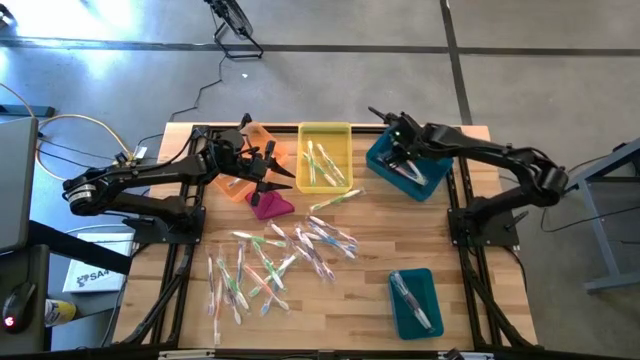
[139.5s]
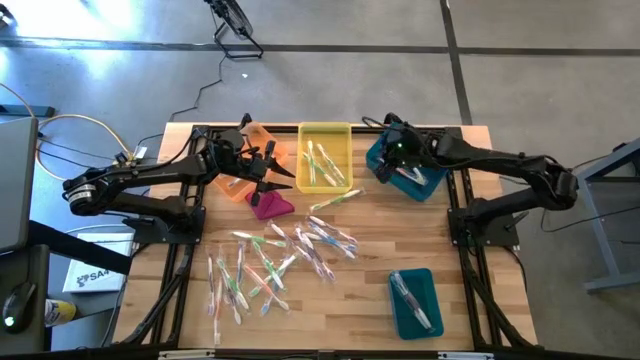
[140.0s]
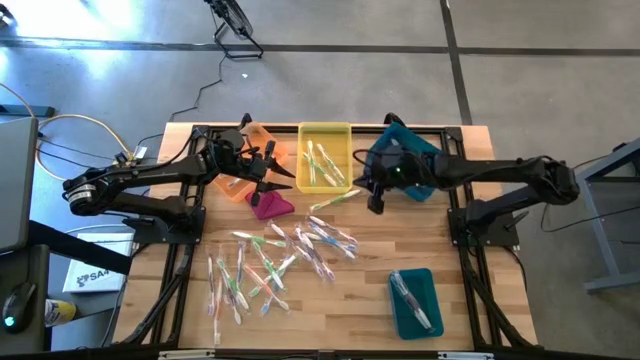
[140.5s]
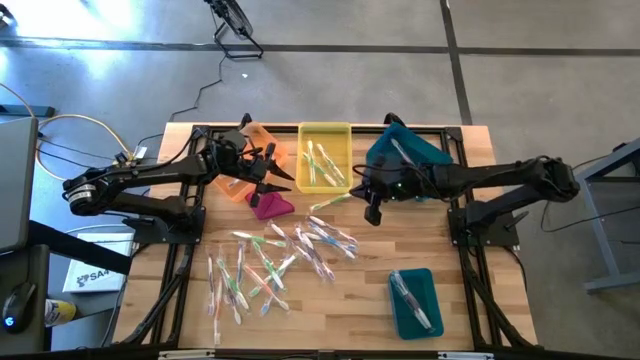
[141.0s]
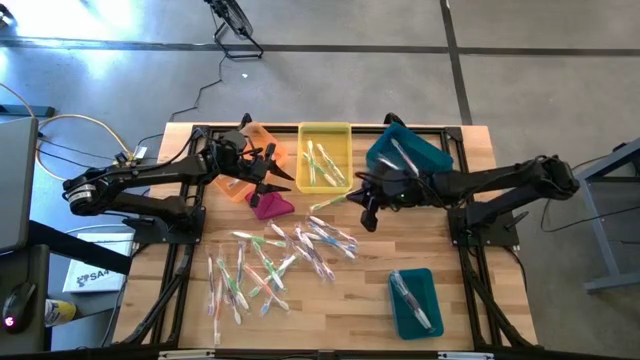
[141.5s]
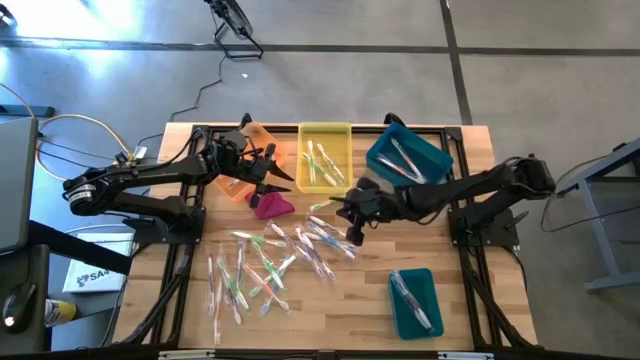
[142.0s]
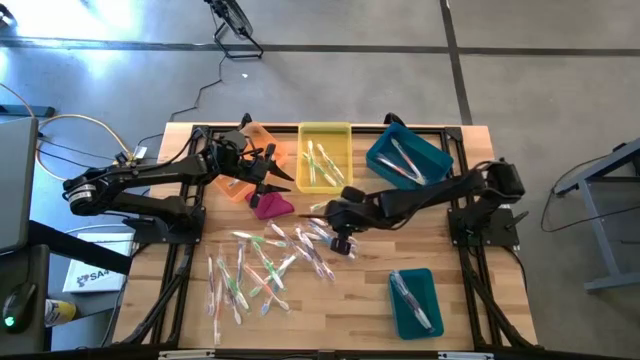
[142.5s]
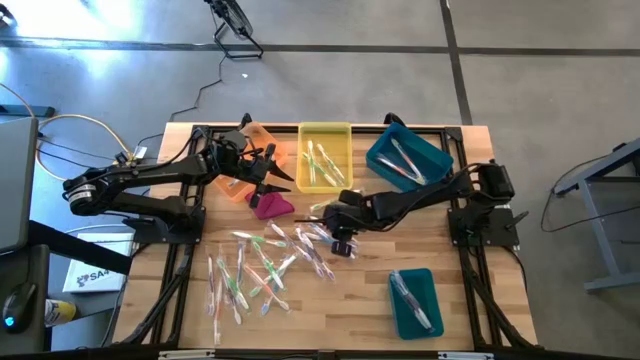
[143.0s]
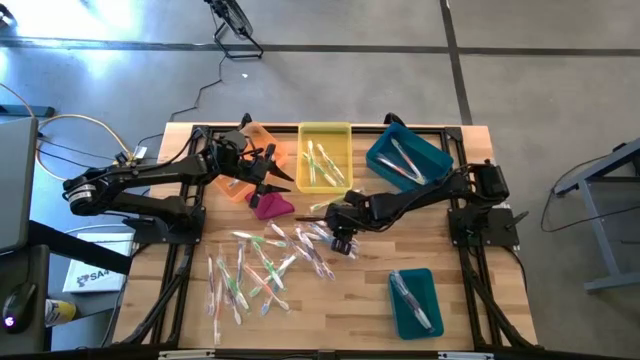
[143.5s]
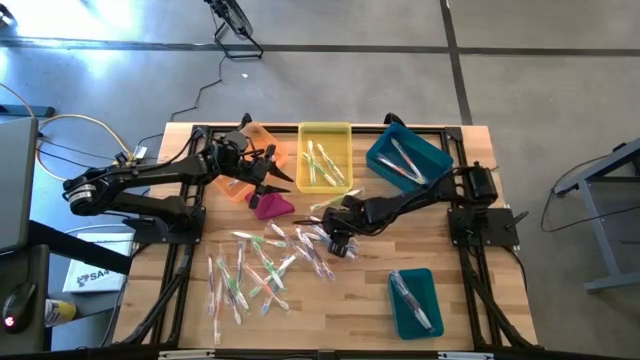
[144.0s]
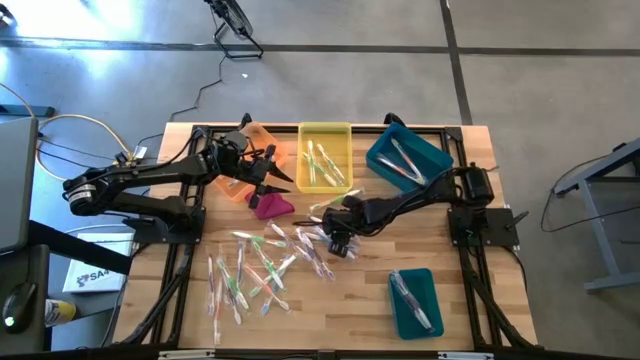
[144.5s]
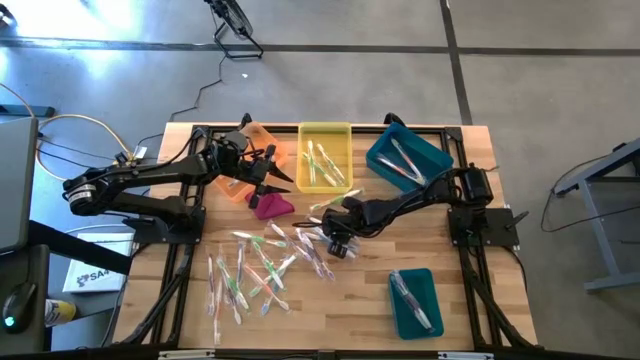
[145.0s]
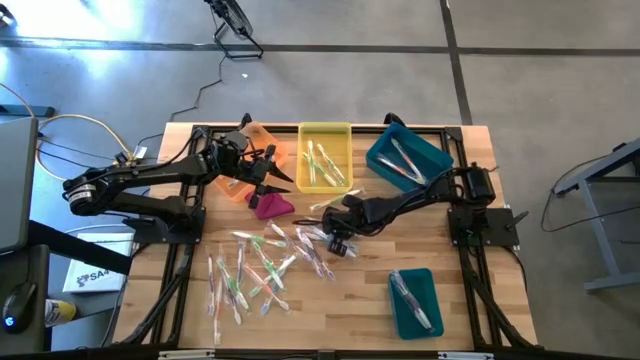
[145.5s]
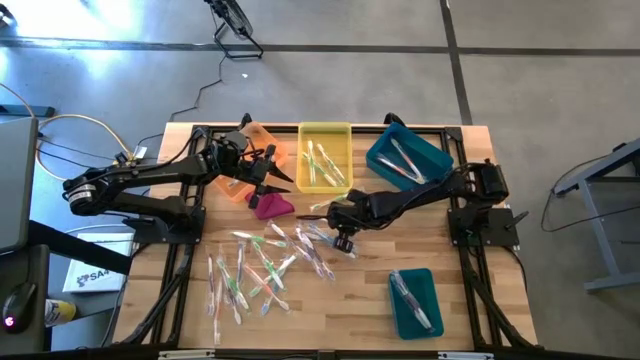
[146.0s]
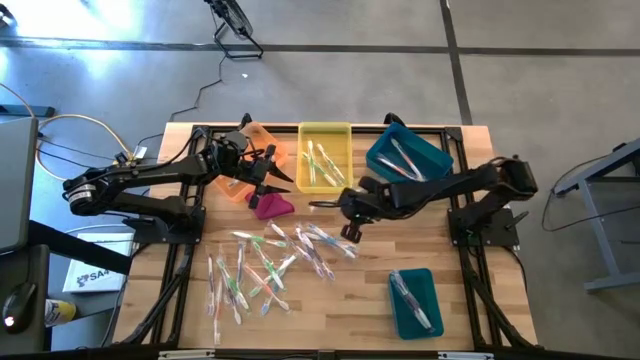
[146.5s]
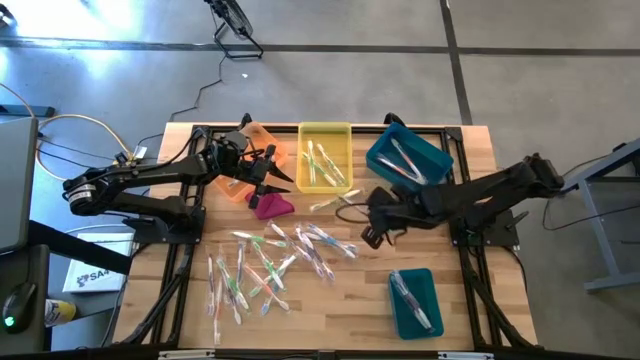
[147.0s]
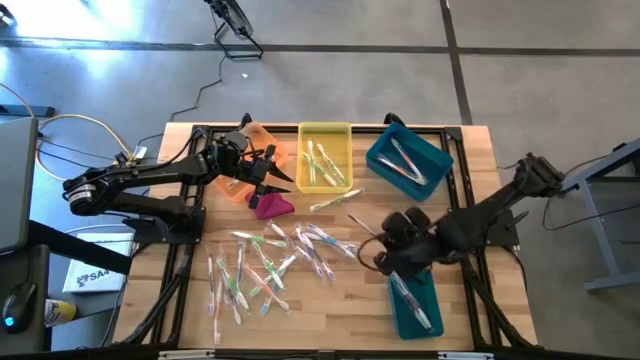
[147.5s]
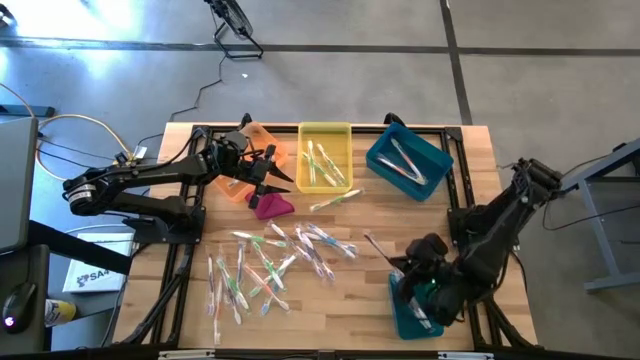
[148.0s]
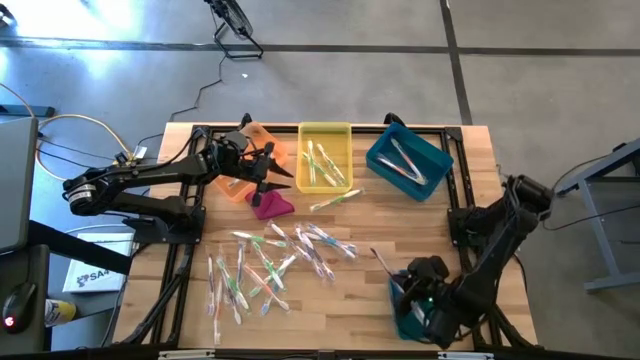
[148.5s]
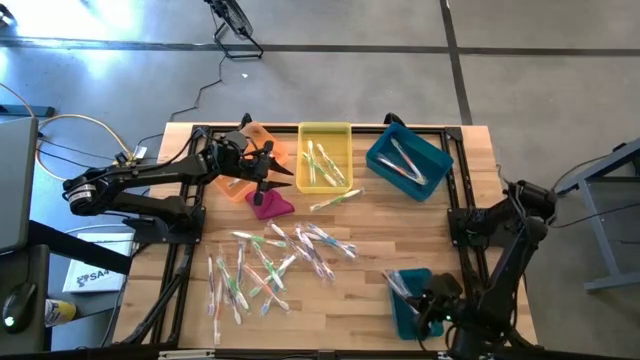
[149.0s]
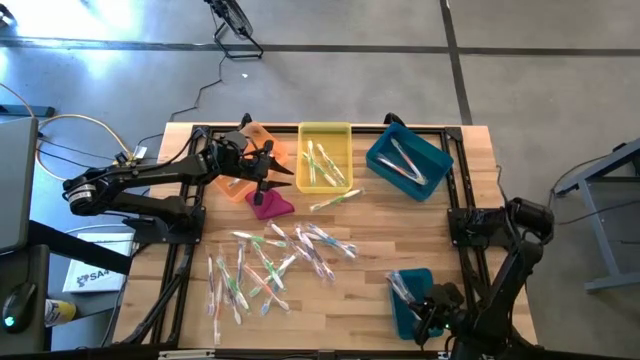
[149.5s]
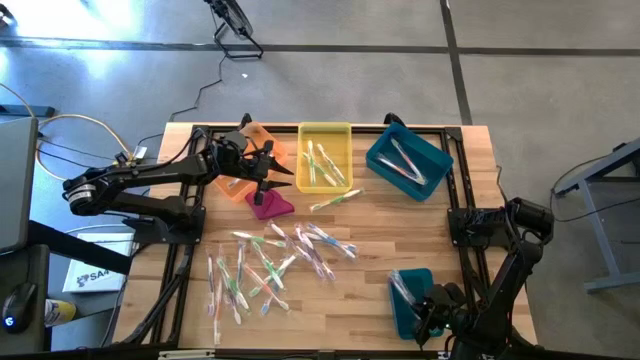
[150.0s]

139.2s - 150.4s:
Task: Pick & Place Toothbrushes
Put the purple toothbrush into the bottom blue bin

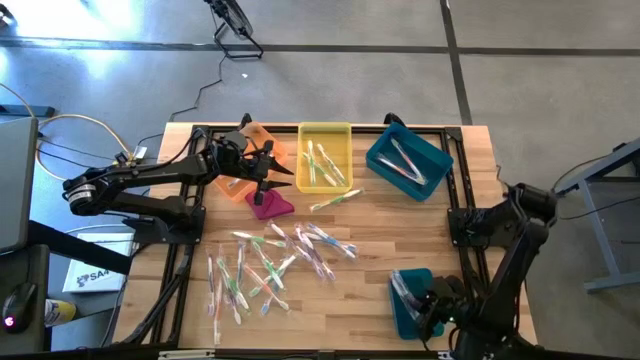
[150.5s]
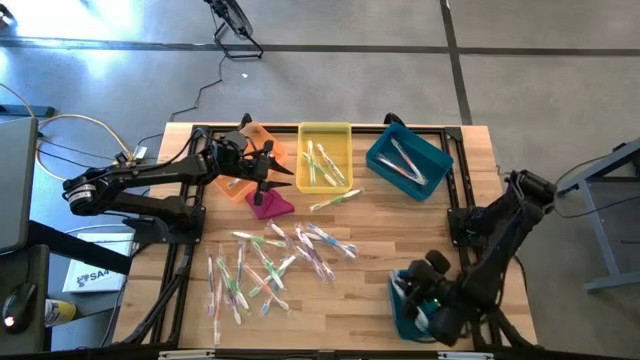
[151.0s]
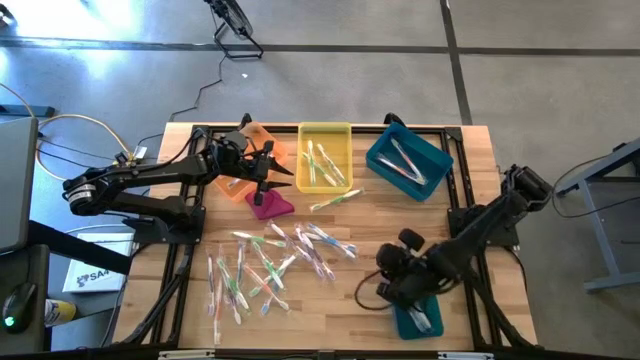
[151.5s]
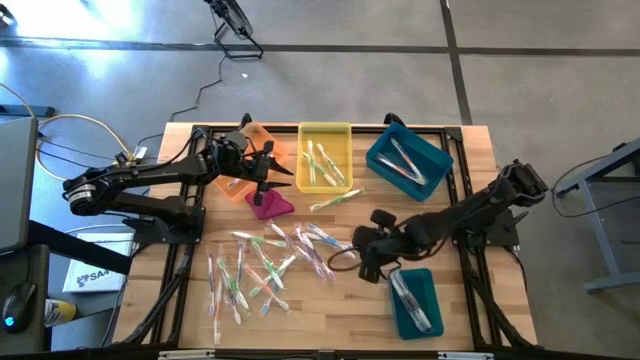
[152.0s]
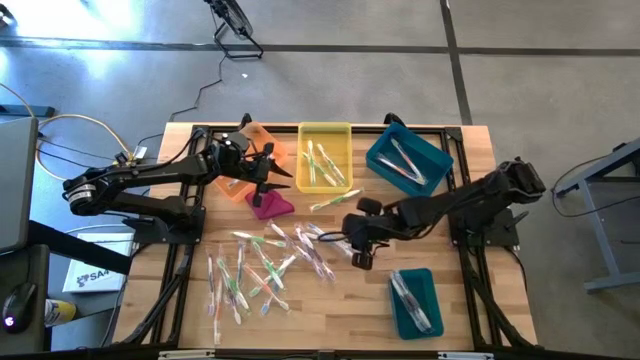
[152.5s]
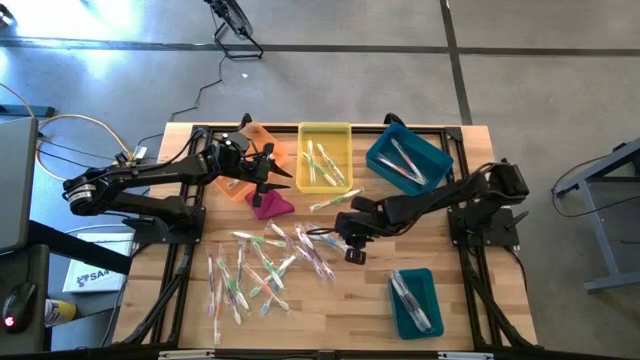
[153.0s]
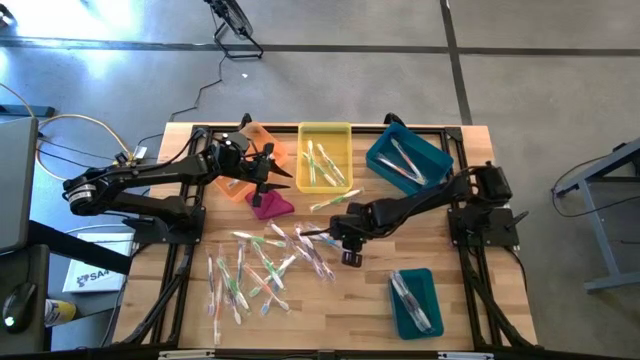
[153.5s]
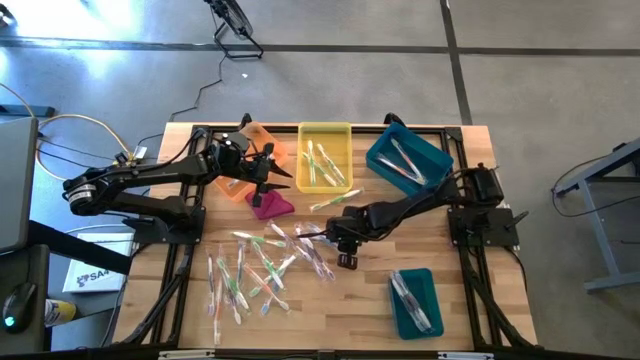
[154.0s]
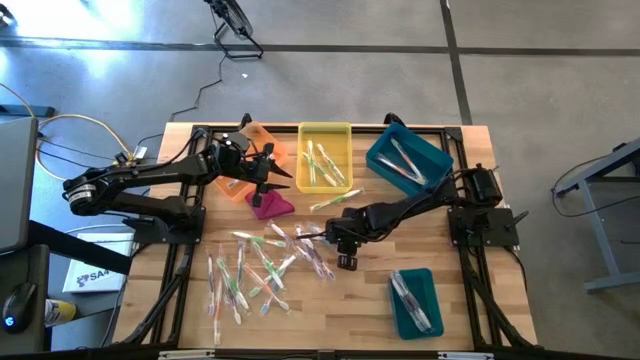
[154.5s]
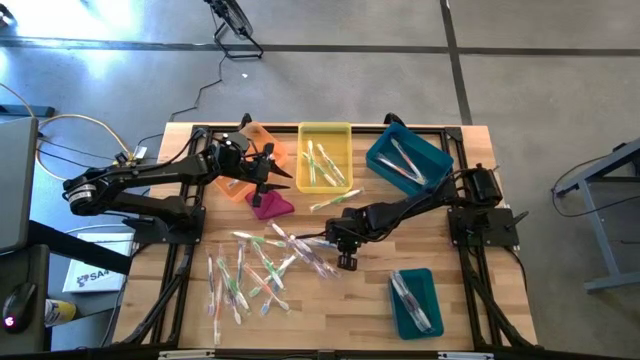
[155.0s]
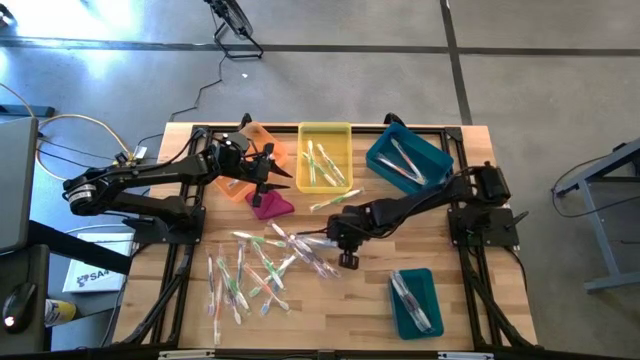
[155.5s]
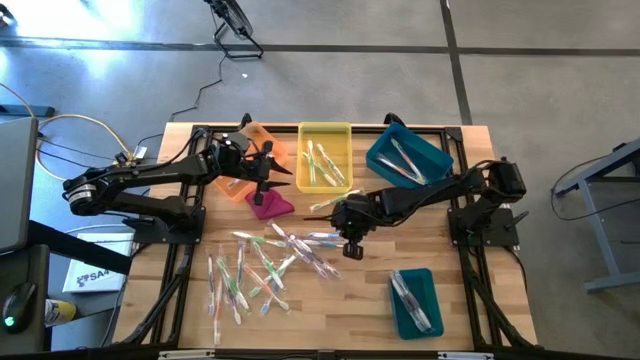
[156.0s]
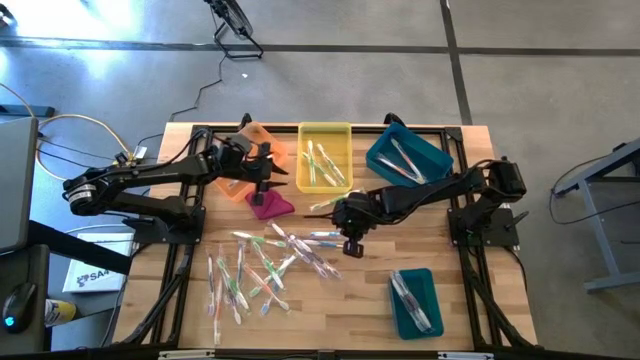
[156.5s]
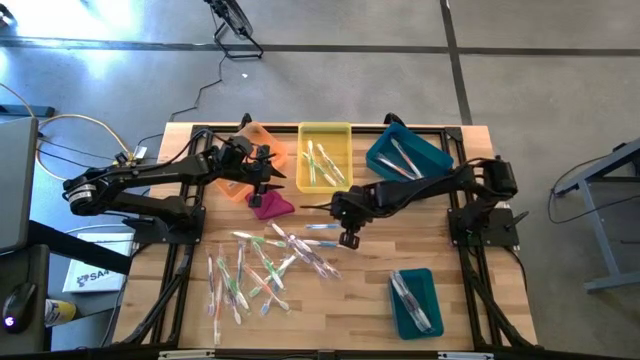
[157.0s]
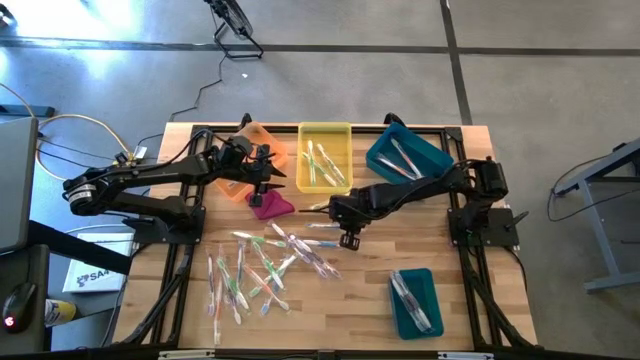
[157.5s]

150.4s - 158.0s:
Put the blue toothbrush into the orange bin

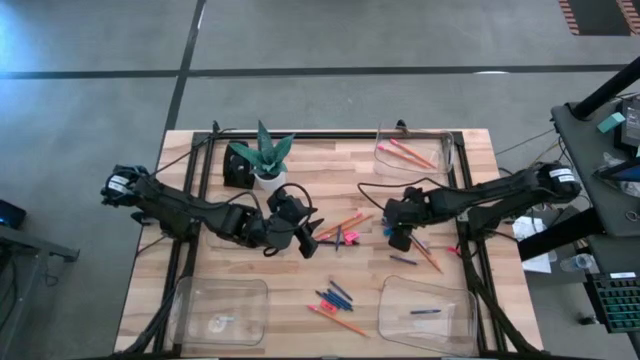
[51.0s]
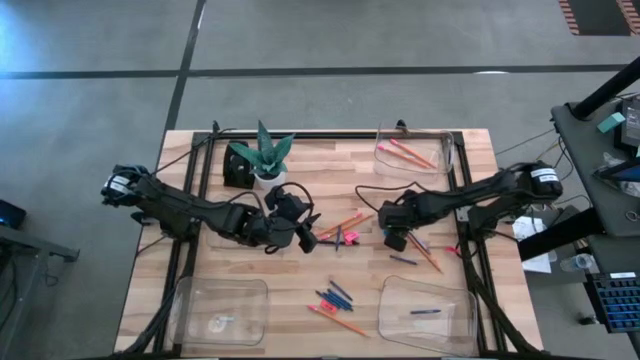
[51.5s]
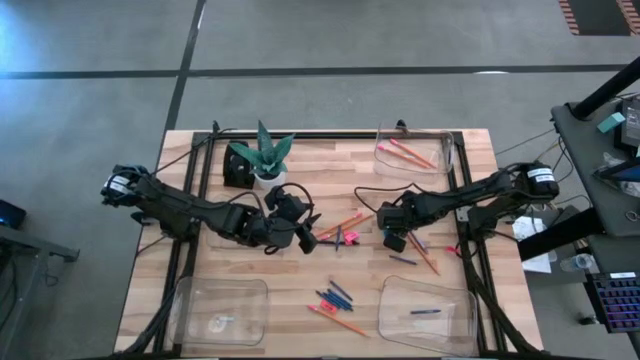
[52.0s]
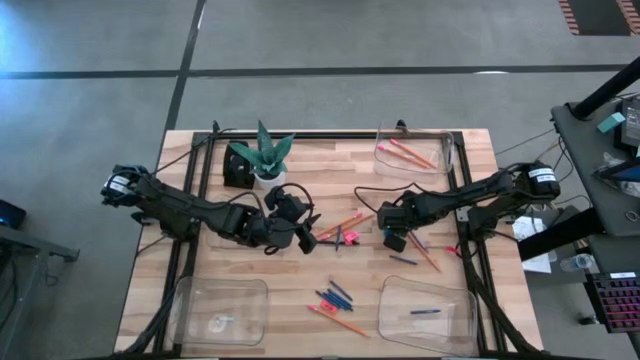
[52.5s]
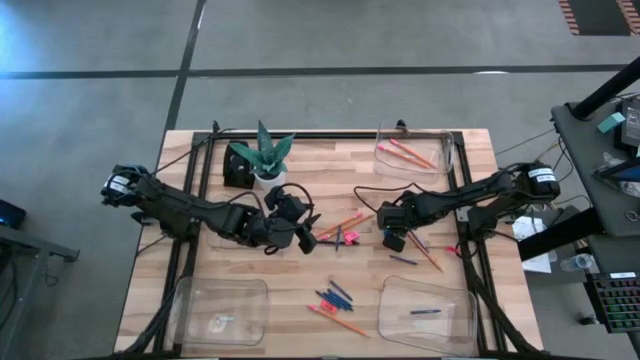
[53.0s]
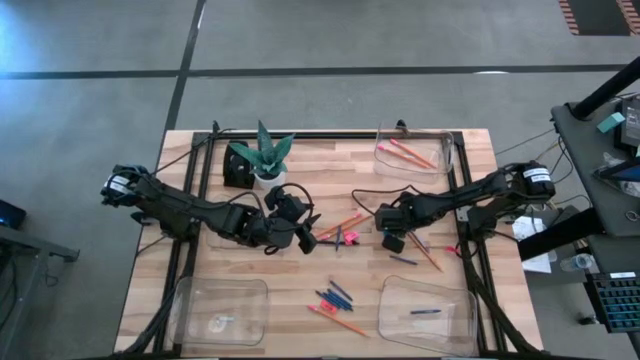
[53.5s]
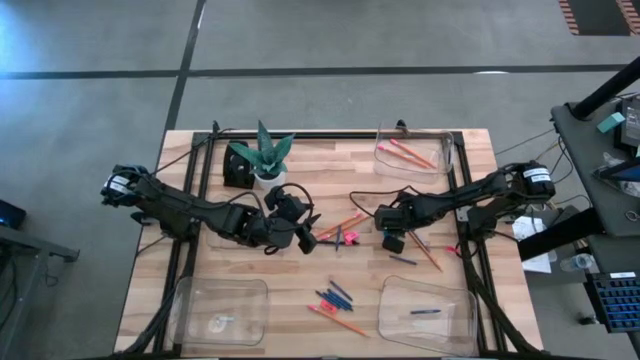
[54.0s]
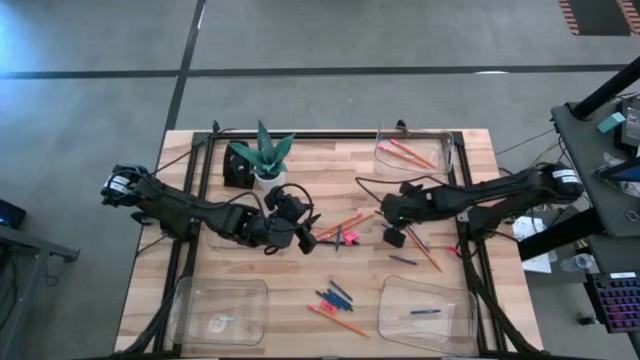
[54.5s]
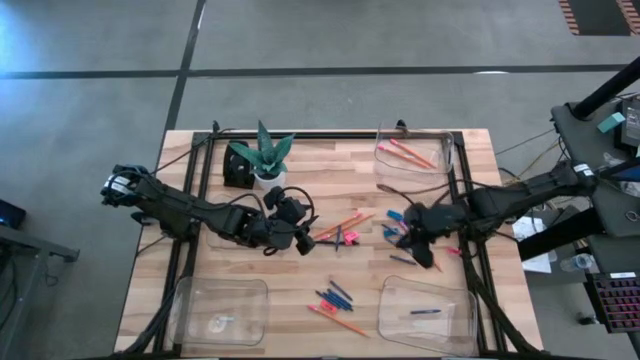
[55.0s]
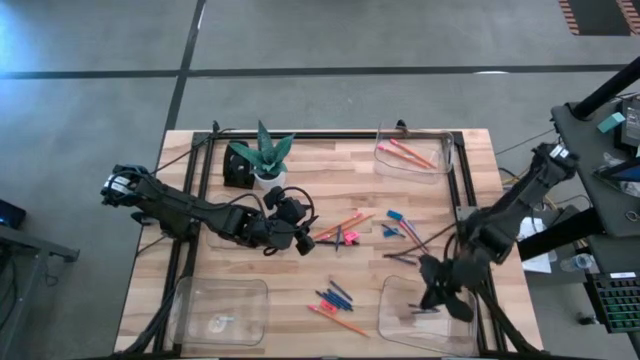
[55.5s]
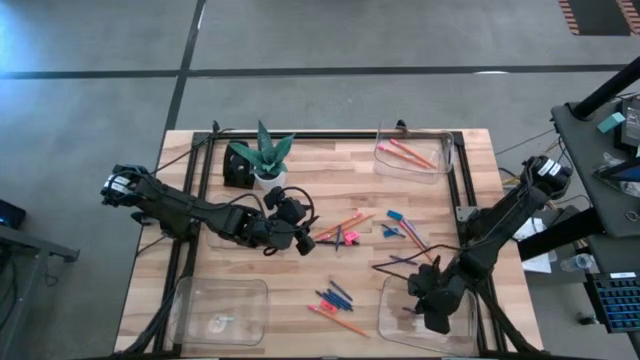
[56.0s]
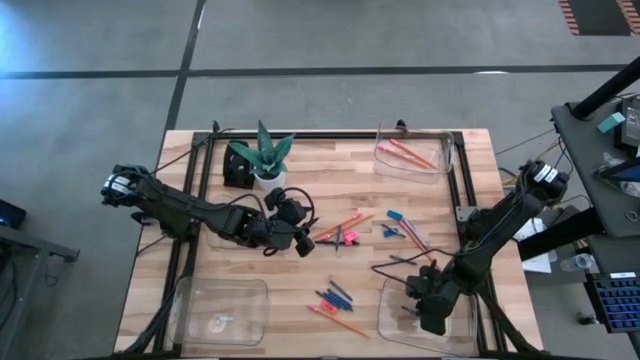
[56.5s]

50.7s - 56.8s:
Task: Sort crayons/erasers/pens/pencils in bins
Put the blue crayon into the bottom right transparent bin
